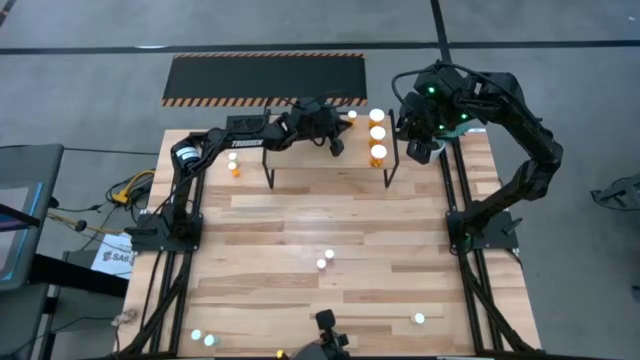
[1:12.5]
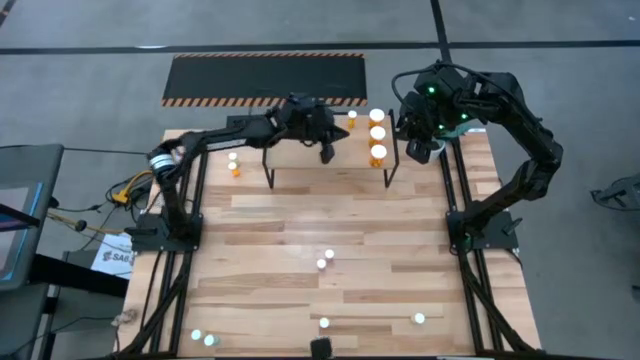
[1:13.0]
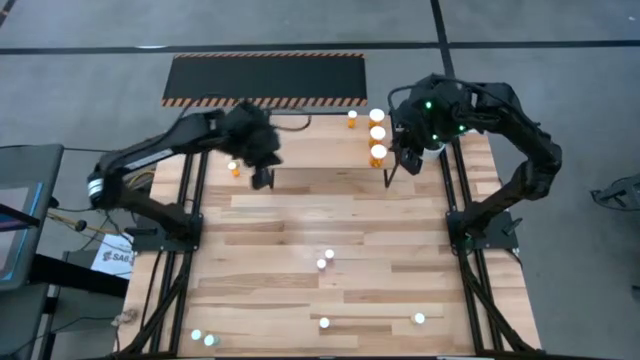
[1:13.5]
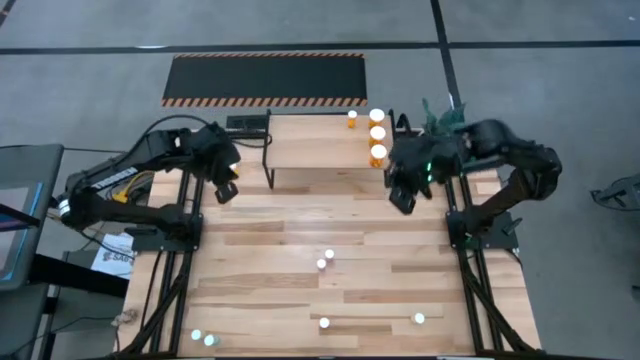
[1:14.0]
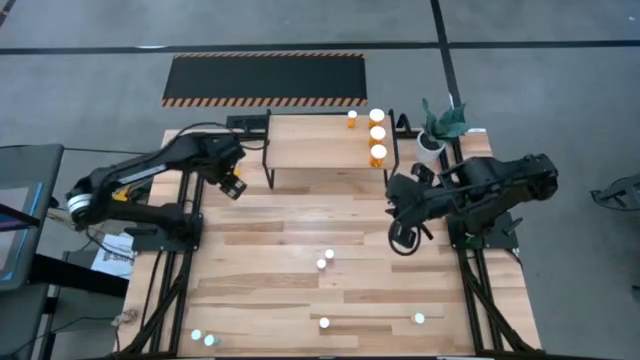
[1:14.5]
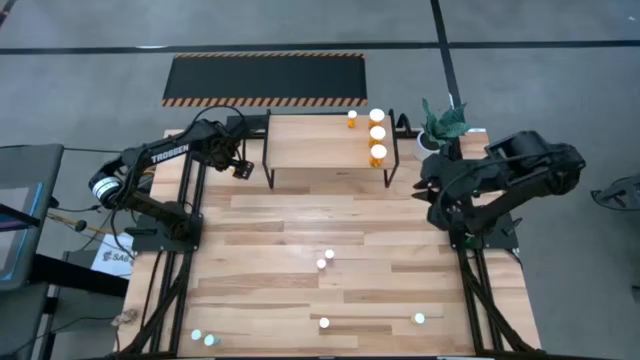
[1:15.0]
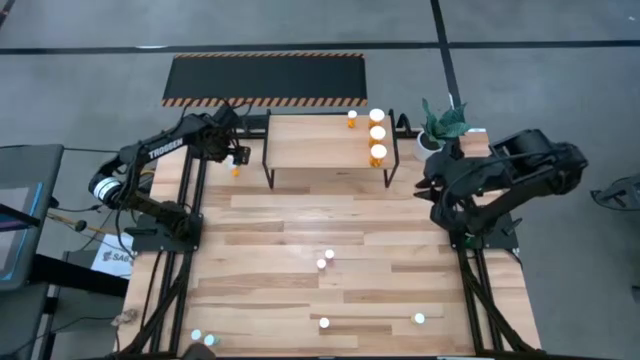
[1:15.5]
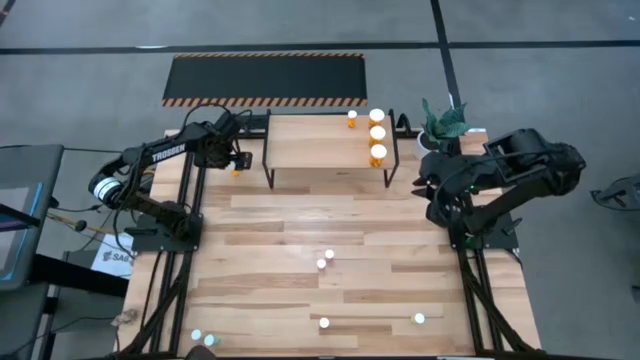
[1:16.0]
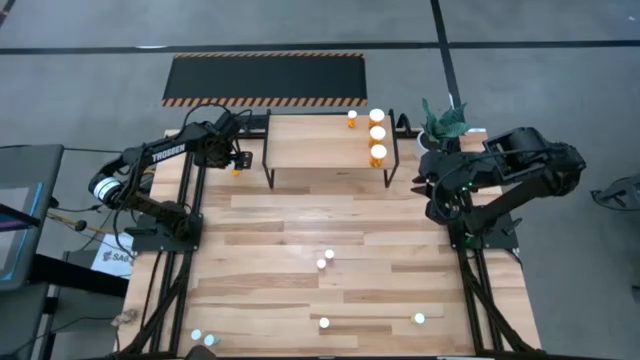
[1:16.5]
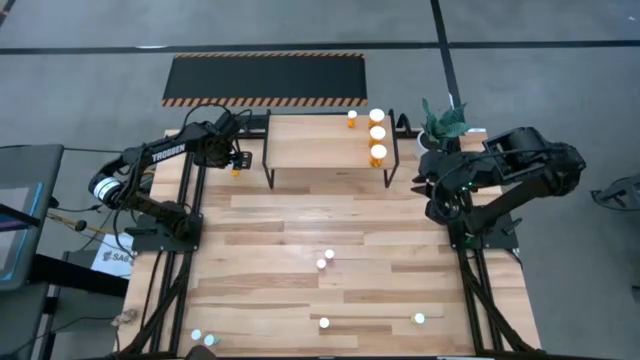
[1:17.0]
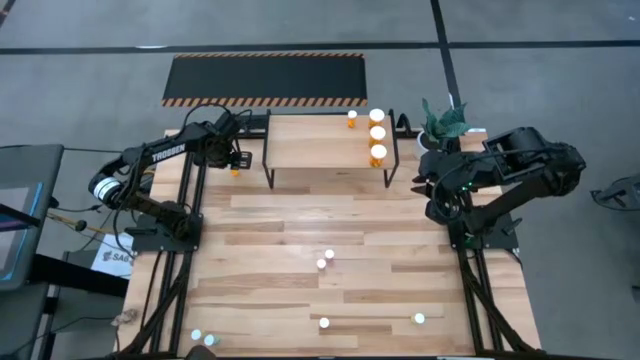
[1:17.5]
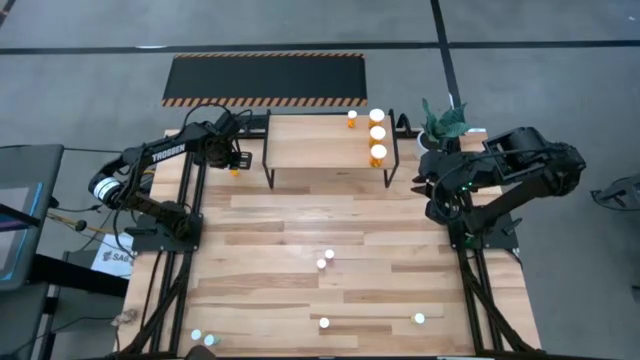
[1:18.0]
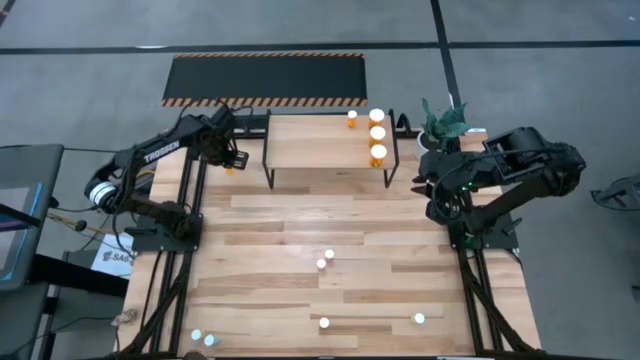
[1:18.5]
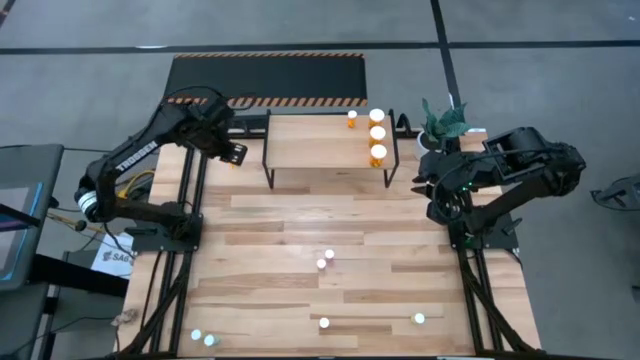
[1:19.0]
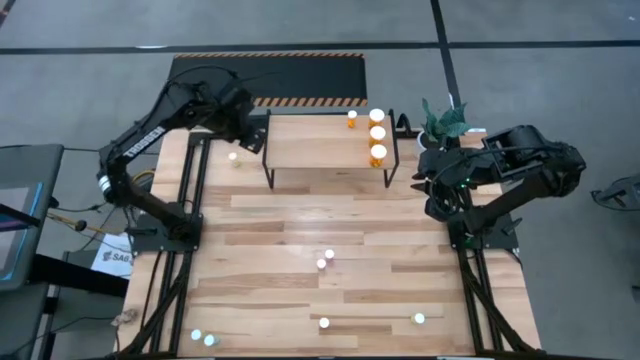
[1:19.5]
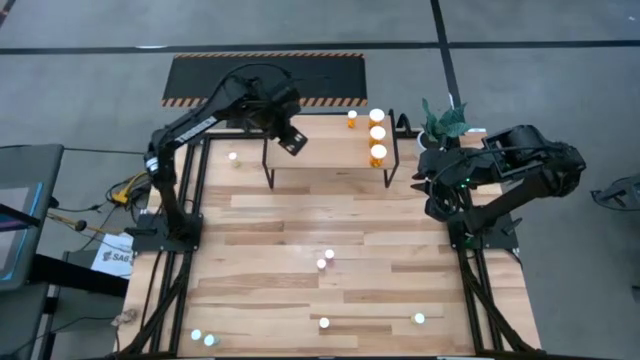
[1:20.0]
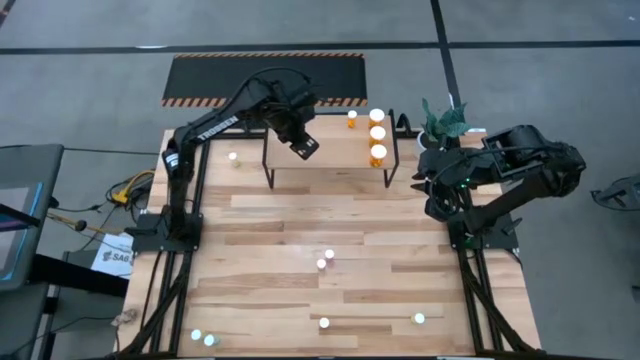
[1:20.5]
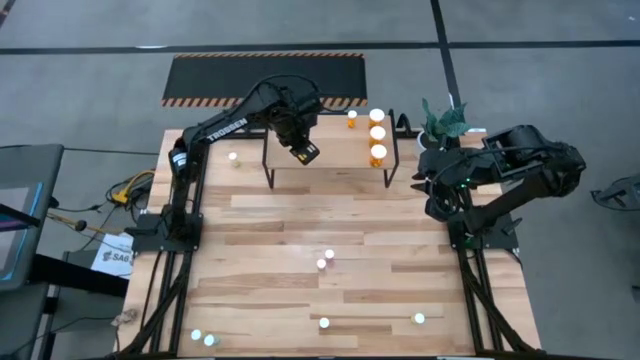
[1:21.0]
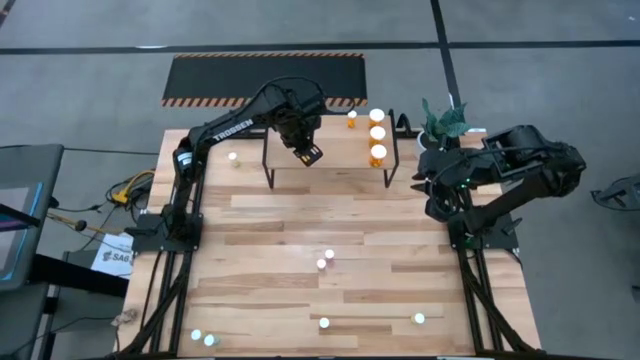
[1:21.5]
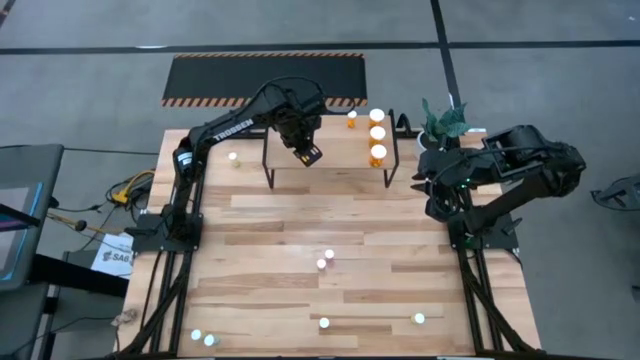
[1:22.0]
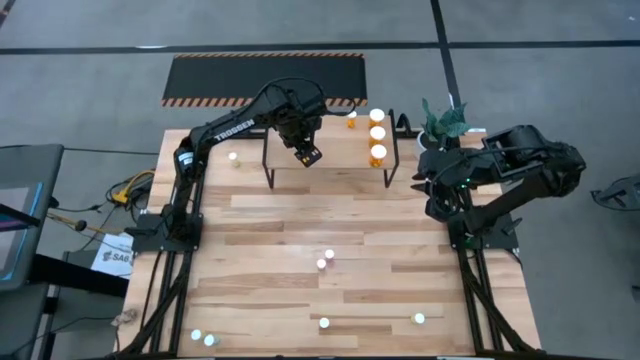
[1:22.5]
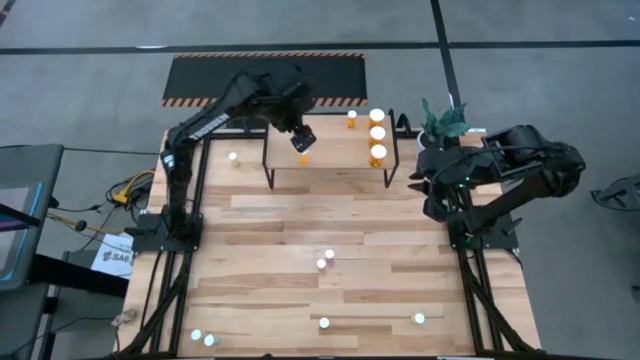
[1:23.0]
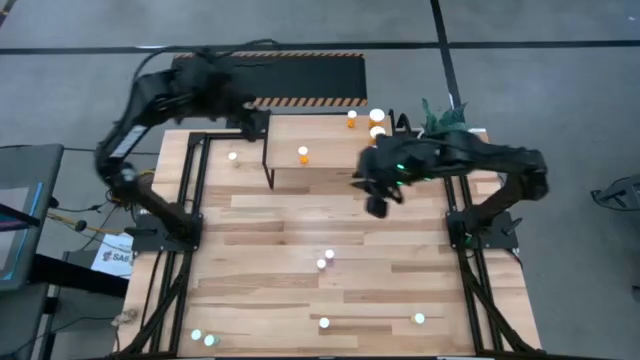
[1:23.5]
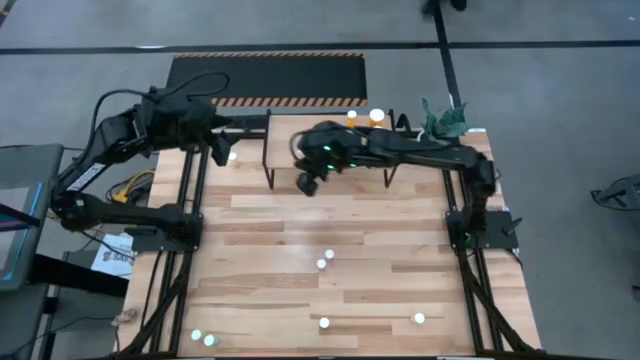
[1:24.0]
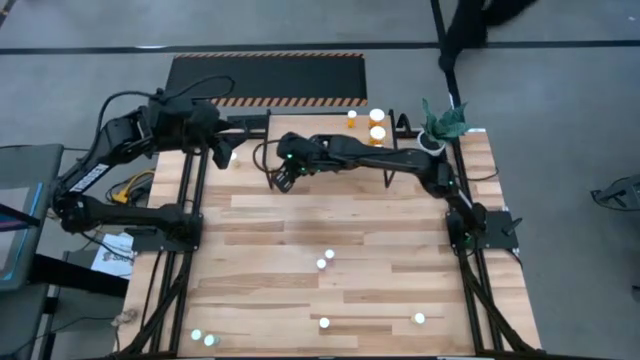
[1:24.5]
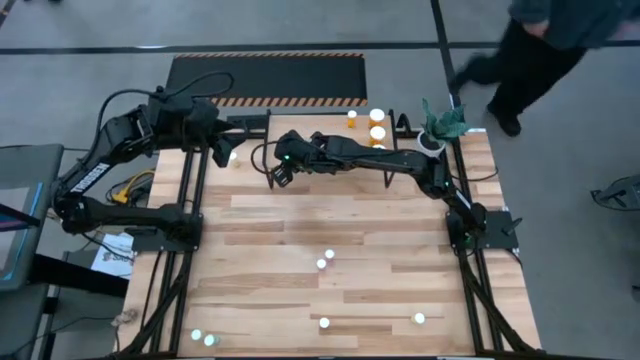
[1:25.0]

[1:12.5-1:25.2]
Task: Pick and place medicine bottles onto shelf by color
Put the top small orange pill bottle on the shelf aligned with the other small orange pill bottle

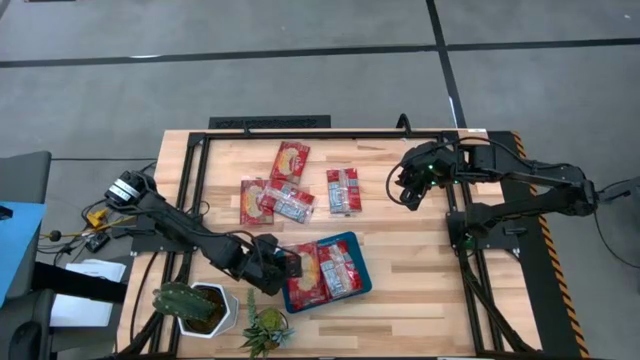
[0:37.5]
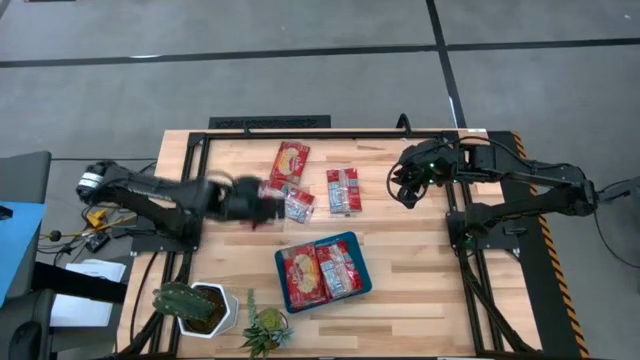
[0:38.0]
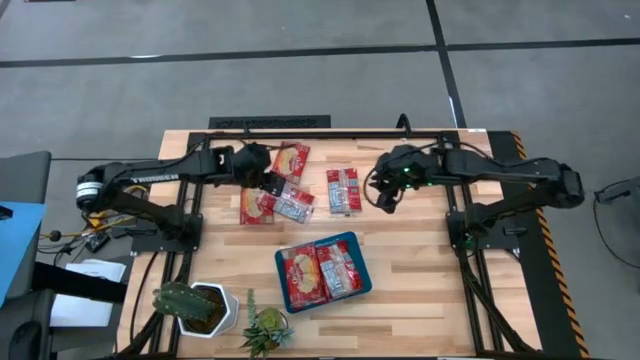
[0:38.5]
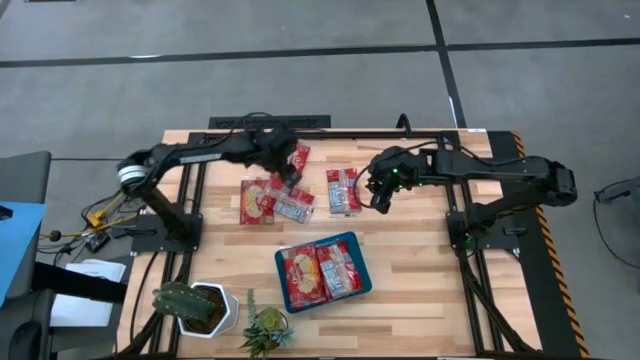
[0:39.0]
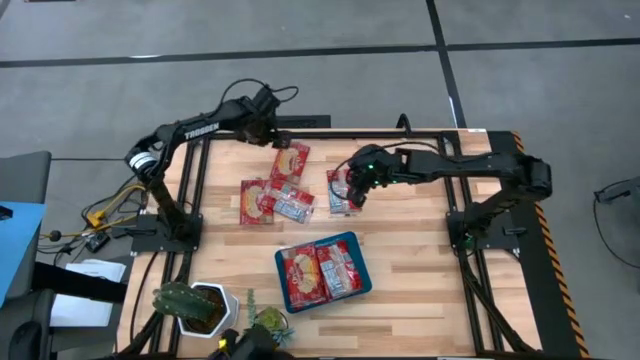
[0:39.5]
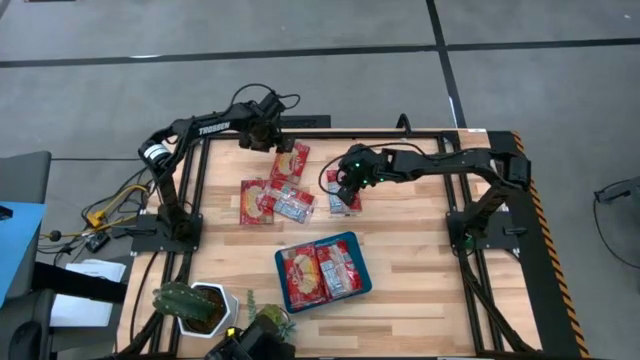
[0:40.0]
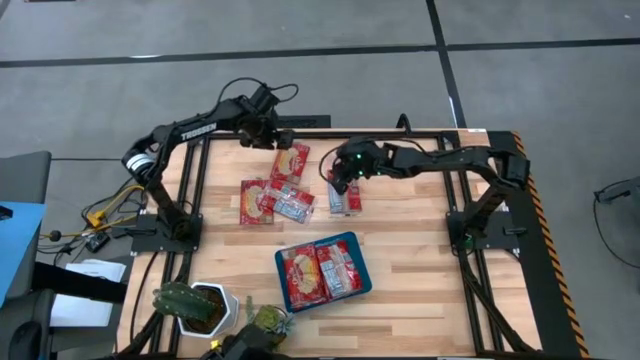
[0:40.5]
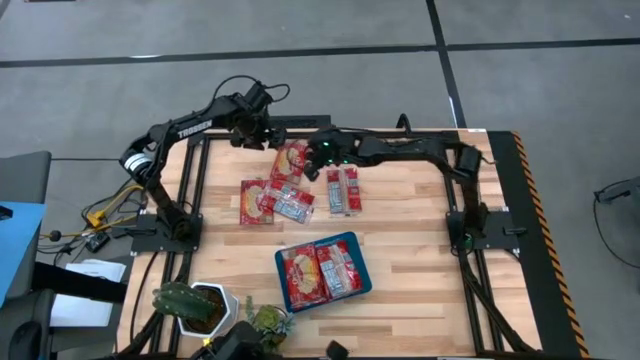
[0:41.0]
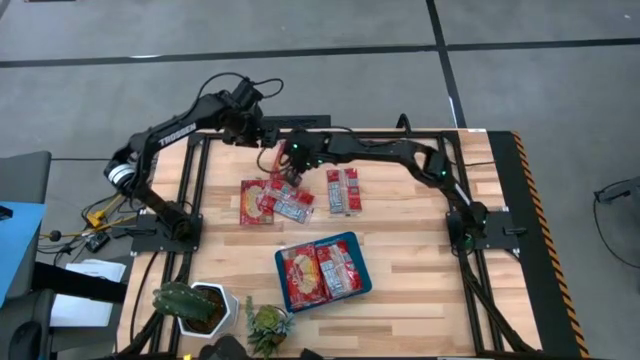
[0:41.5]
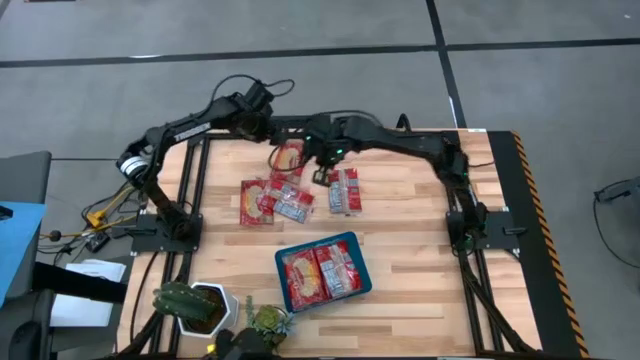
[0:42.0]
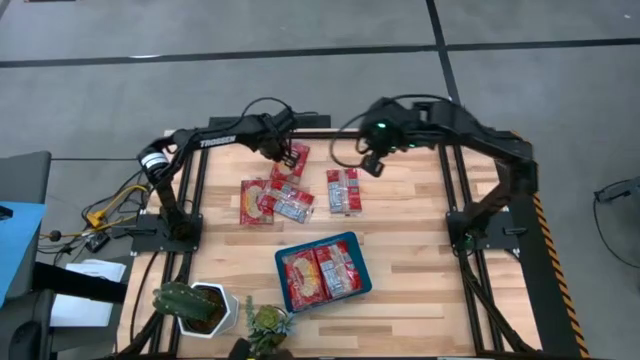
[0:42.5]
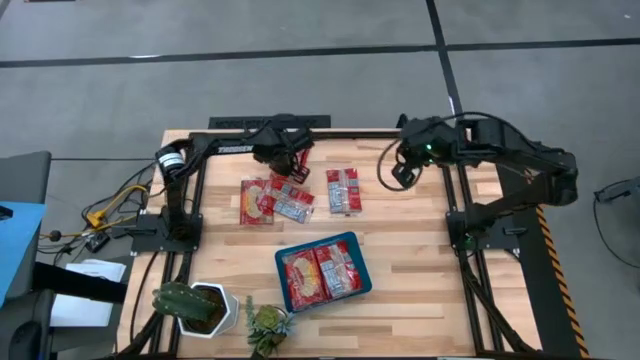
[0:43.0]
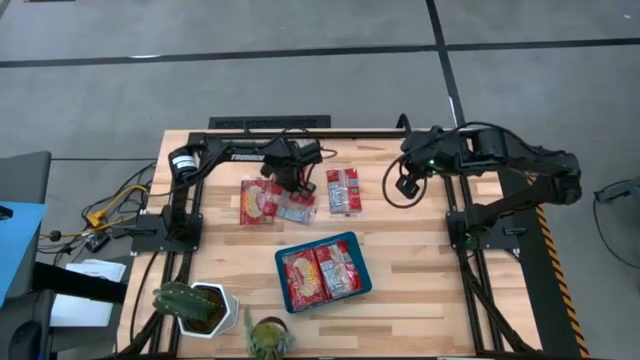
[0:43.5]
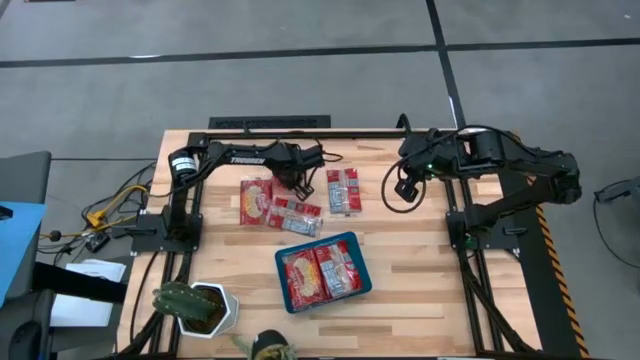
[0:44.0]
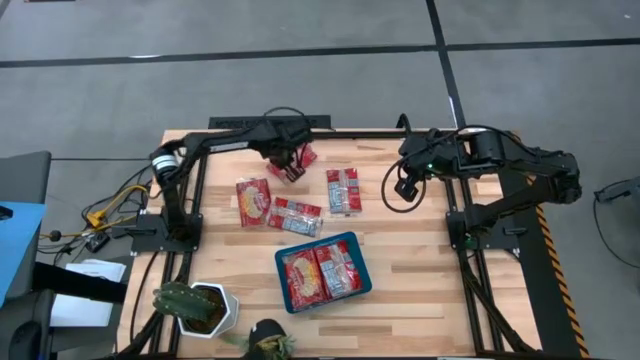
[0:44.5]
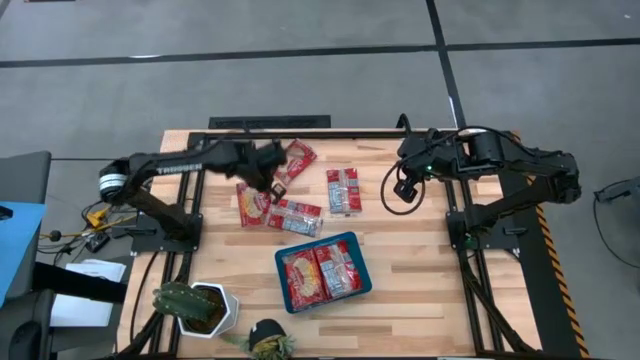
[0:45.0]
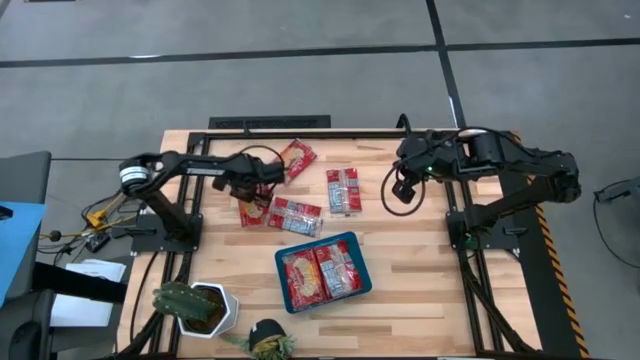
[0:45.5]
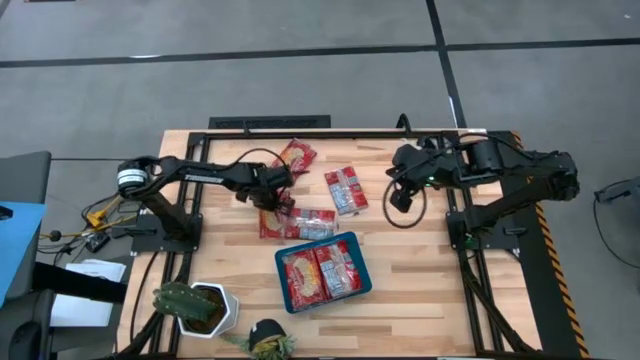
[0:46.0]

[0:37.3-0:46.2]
Task: Sort popcorn bags into baskets
Adjust the popcorn bags
